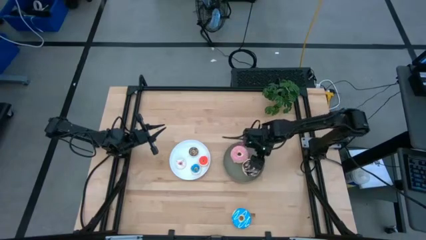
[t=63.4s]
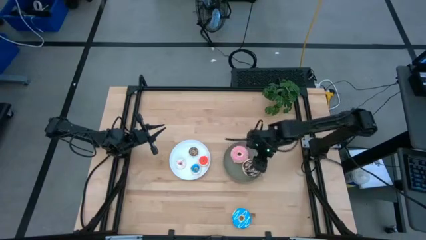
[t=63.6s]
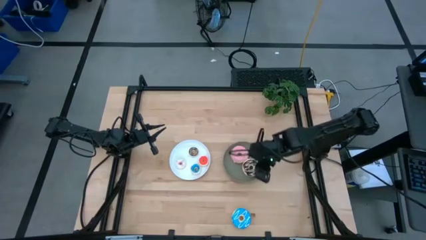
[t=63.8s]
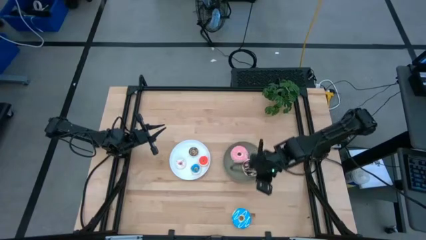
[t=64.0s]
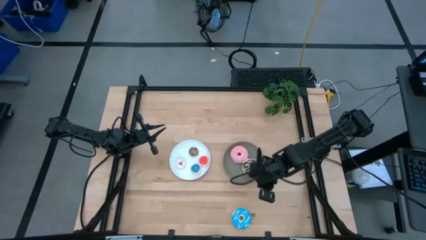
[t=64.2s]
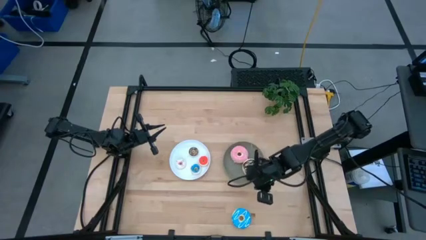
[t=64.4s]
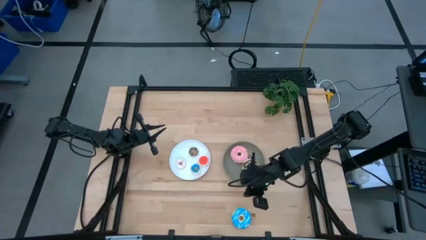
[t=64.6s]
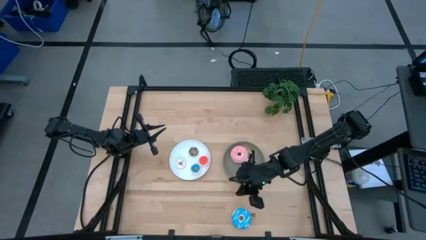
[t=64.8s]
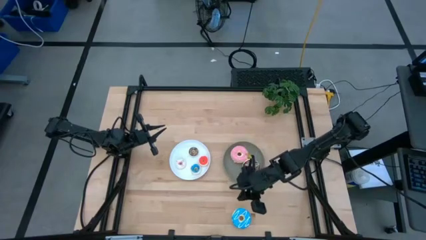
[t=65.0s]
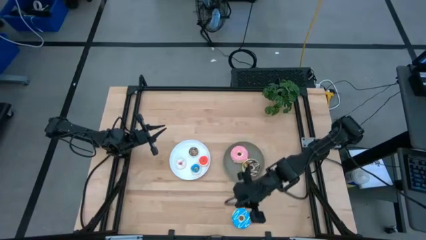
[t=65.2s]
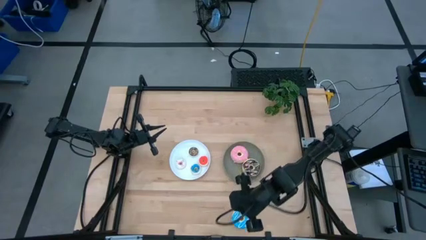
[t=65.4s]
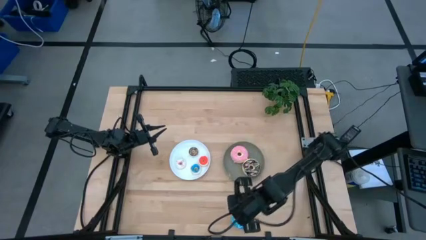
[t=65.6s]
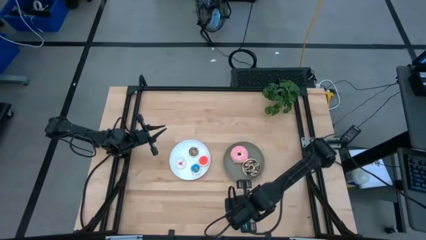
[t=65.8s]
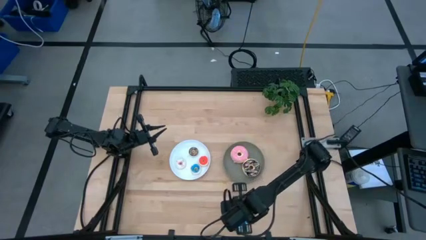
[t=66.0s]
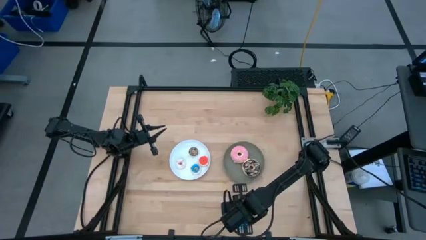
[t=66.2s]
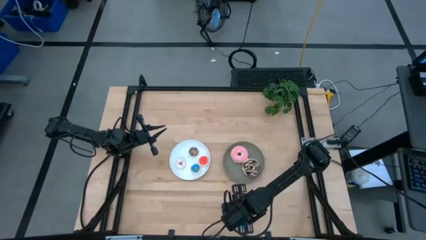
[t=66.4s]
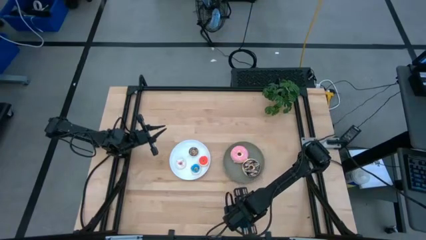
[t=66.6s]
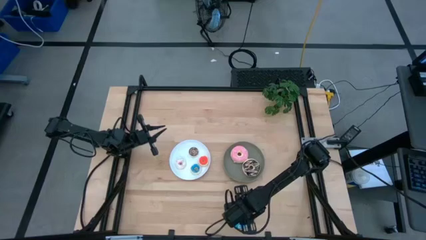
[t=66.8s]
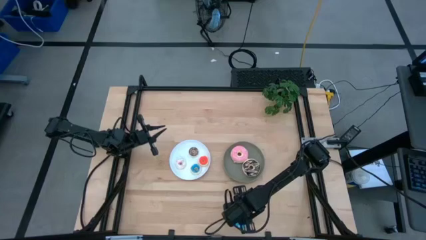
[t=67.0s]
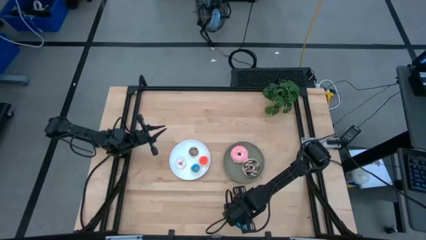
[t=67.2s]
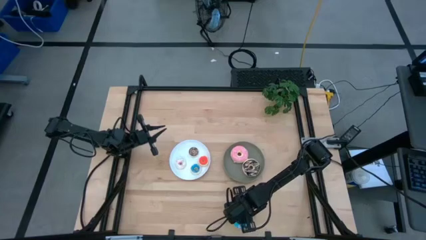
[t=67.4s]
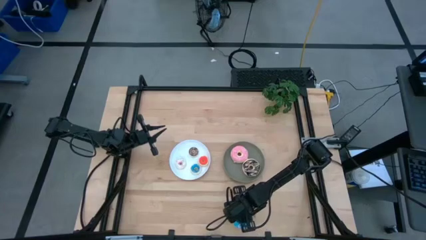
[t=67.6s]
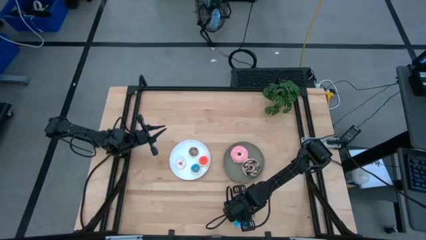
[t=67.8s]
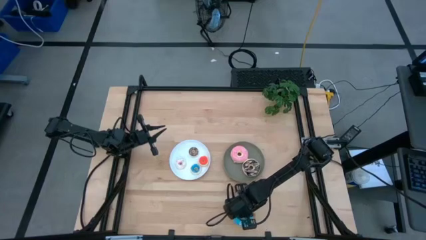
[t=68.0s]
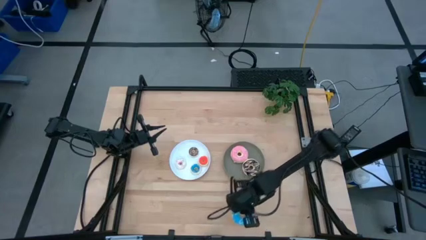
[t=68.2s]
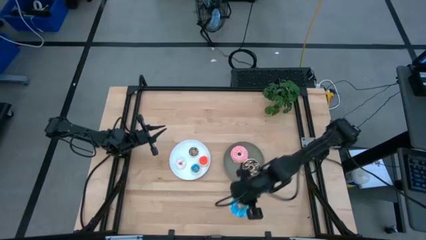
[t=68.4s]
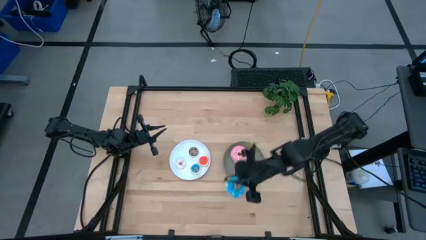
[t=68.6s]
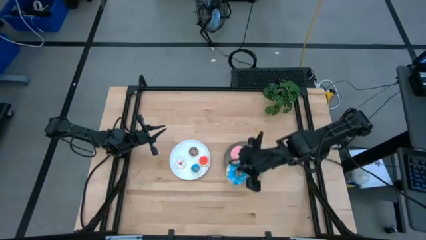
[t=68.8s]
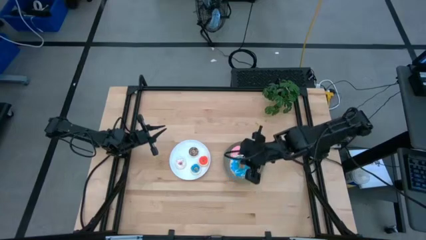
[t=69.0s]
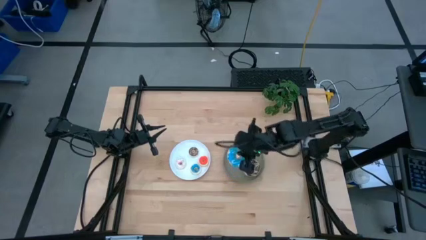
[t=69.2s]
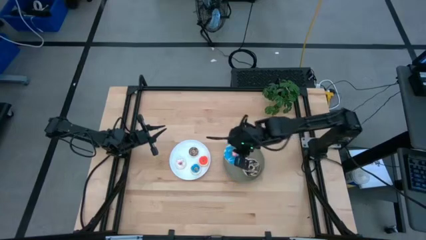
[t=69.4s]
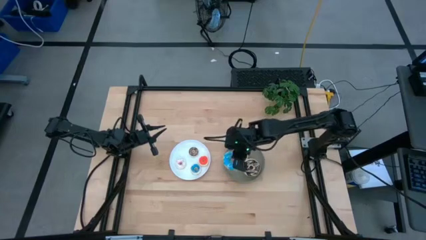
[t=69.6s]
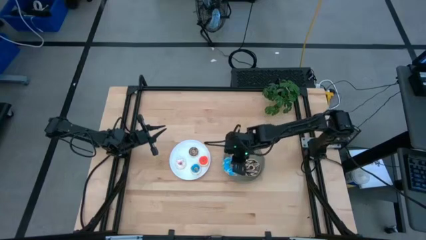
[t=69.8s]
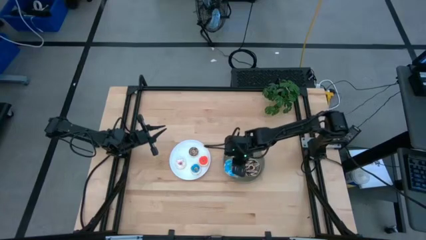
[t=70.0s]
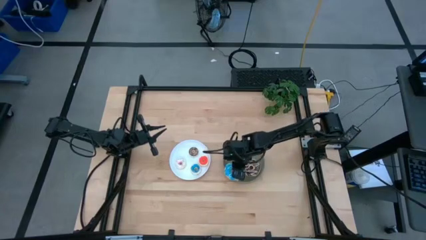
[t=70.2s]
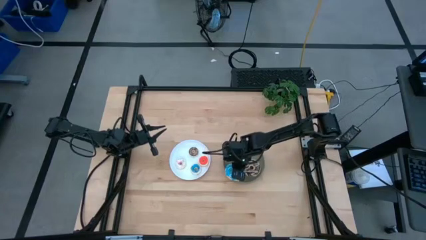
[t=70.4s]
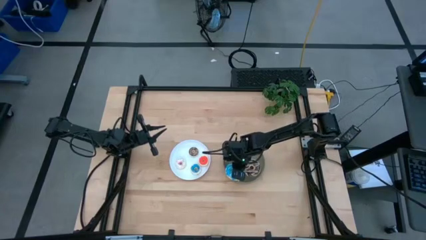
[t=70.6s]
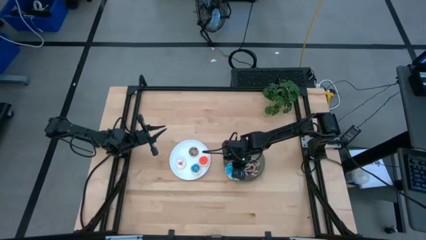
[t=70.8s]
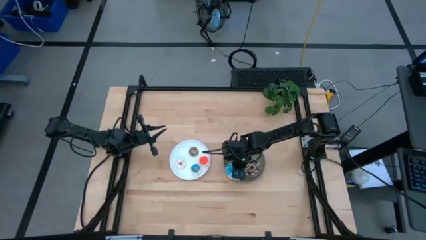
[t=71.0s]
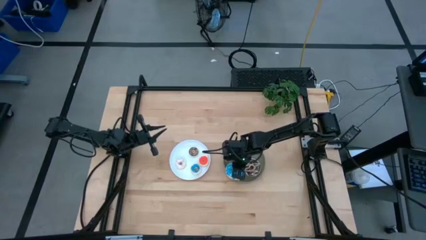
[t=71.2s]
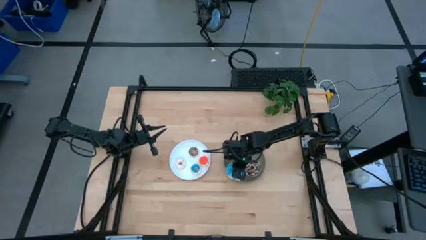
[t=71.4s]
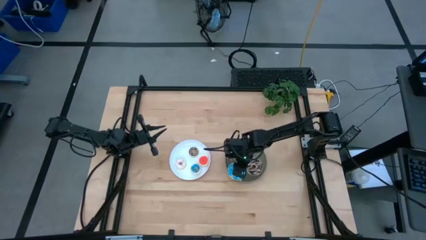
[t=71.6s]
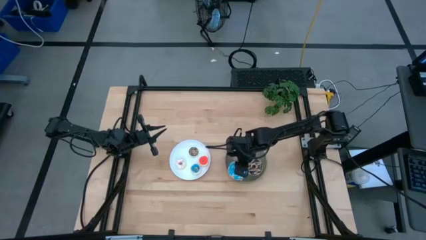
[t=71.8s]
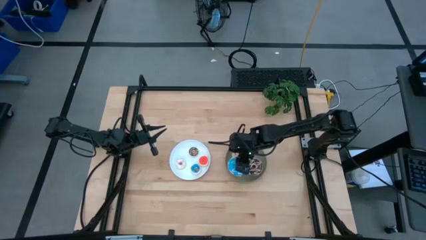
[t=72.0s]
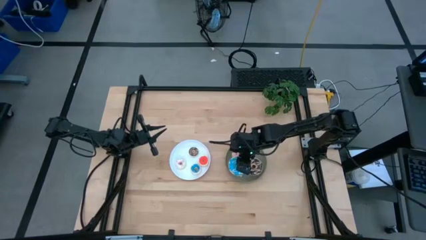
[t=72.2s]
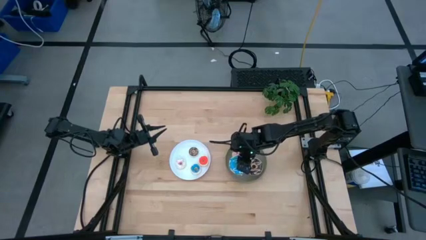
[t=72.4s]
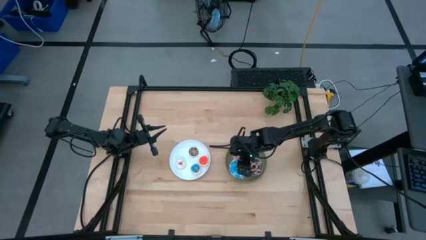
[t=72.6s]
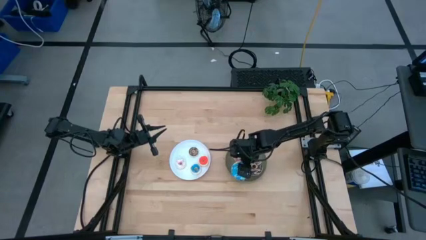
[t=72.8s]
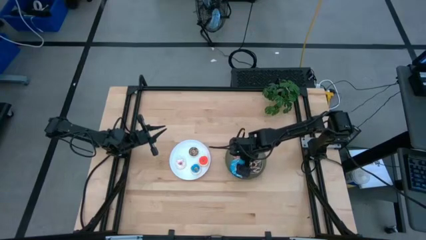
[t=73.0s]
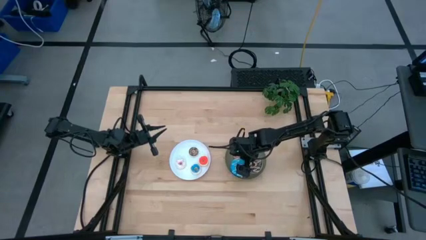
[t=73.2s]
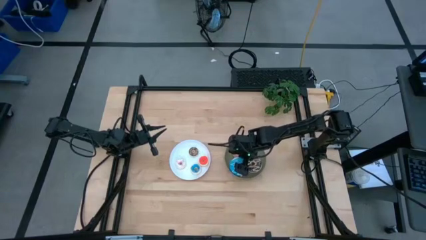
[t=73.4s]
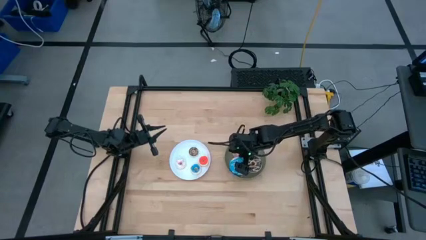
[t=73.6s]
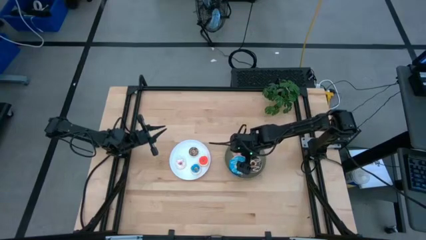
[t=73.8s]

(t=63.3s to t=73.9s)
Task: Pick & Place donuts
Put the big blue doughnut on the gray plate
